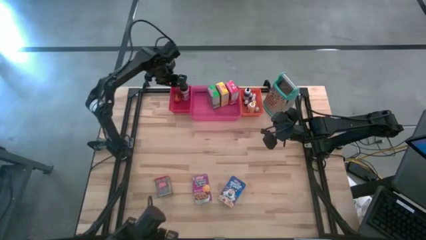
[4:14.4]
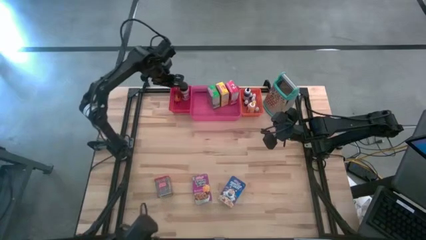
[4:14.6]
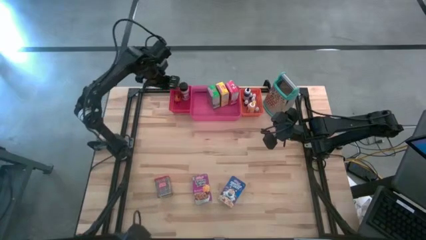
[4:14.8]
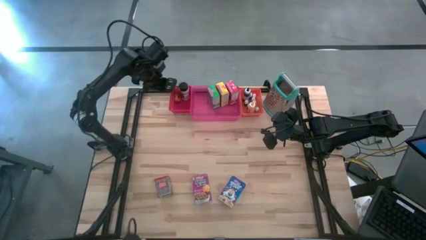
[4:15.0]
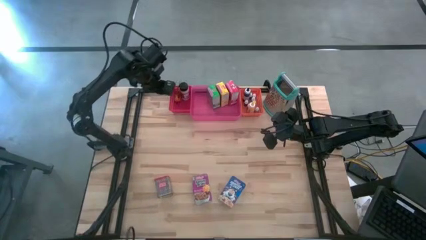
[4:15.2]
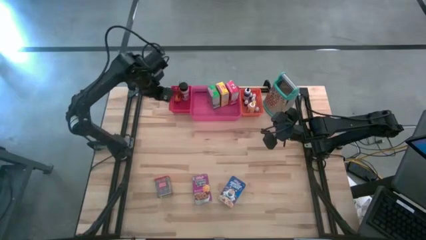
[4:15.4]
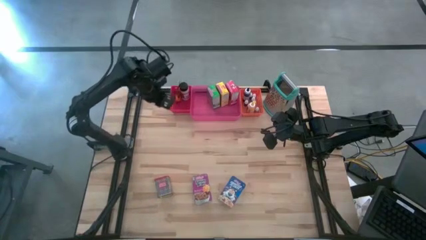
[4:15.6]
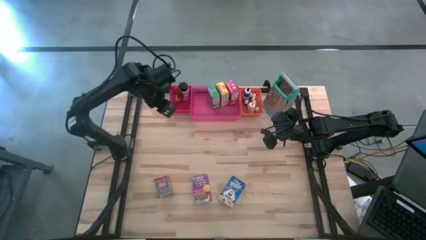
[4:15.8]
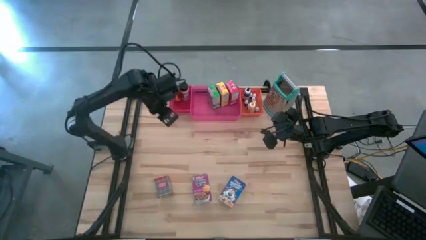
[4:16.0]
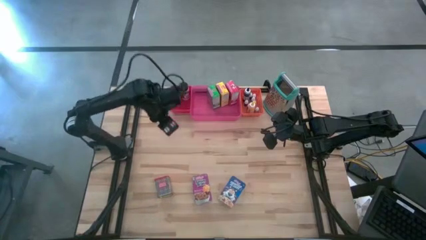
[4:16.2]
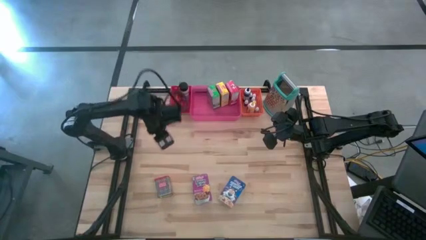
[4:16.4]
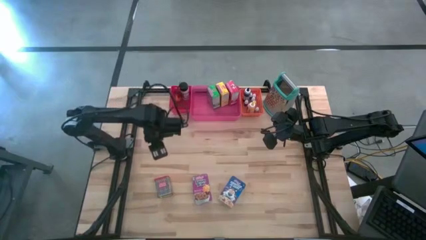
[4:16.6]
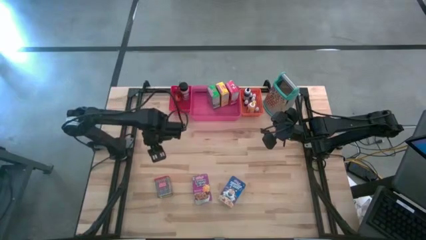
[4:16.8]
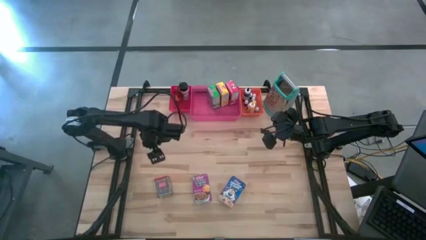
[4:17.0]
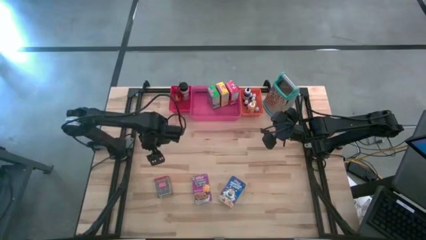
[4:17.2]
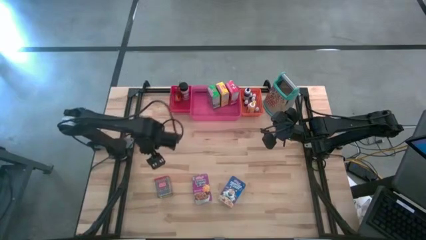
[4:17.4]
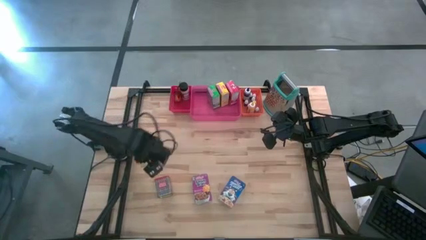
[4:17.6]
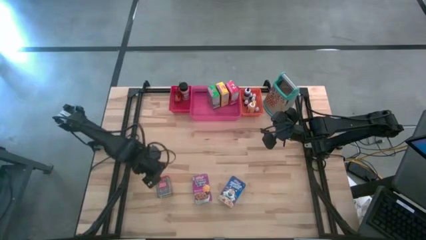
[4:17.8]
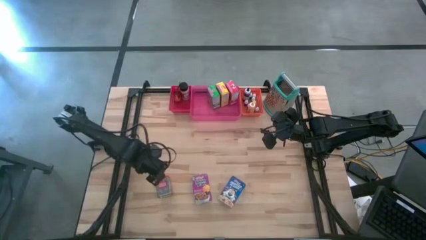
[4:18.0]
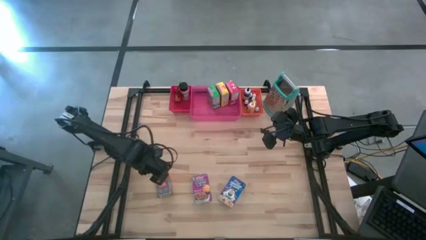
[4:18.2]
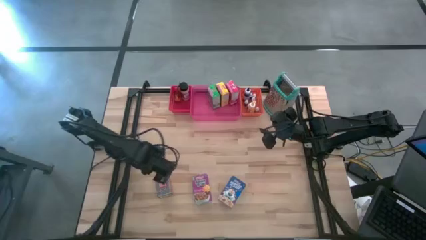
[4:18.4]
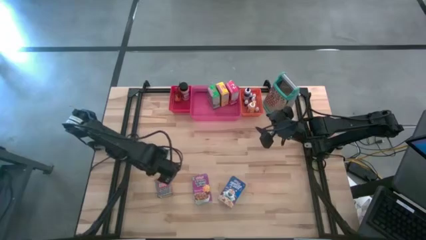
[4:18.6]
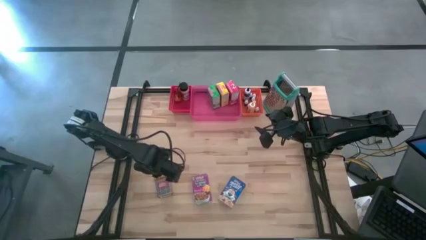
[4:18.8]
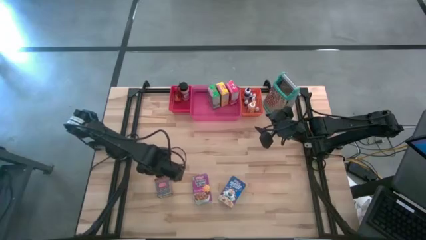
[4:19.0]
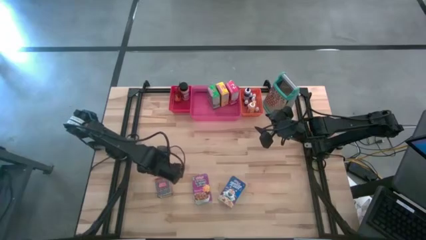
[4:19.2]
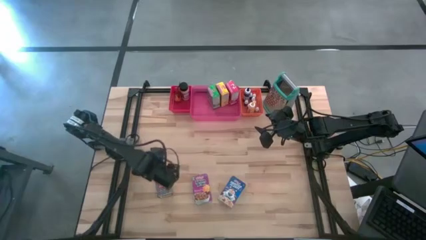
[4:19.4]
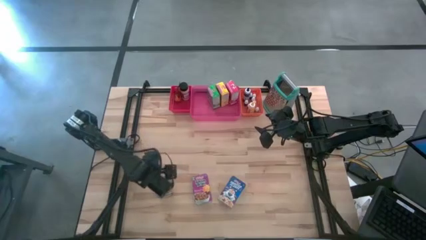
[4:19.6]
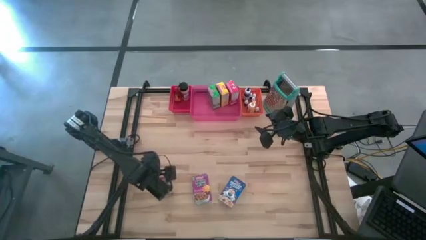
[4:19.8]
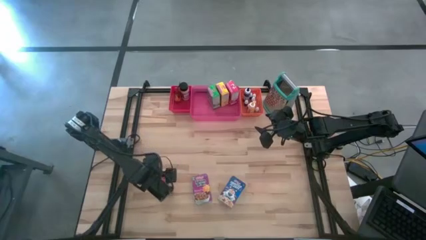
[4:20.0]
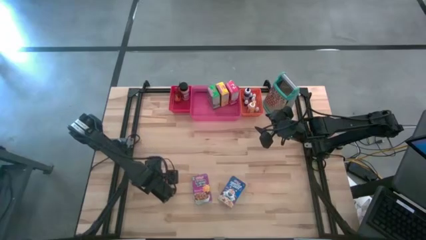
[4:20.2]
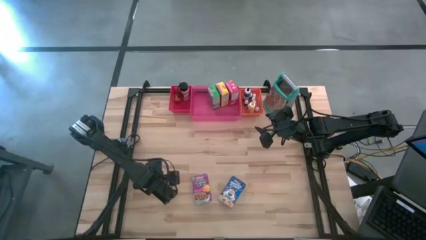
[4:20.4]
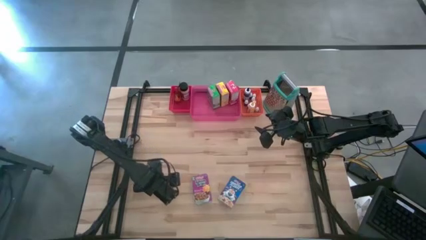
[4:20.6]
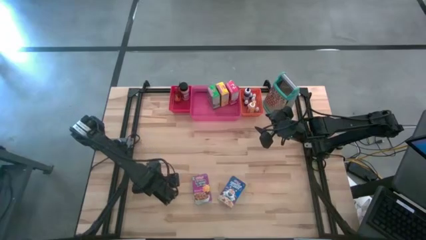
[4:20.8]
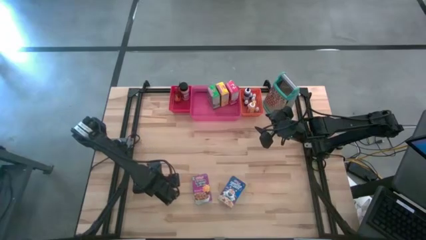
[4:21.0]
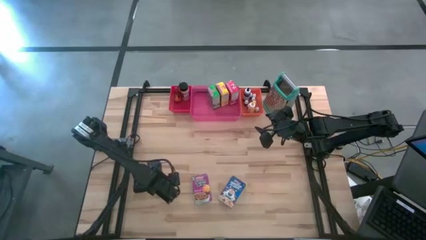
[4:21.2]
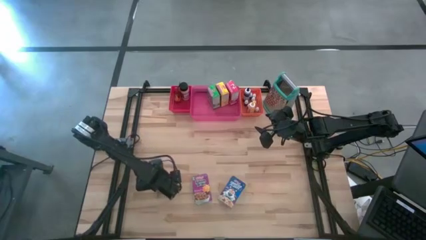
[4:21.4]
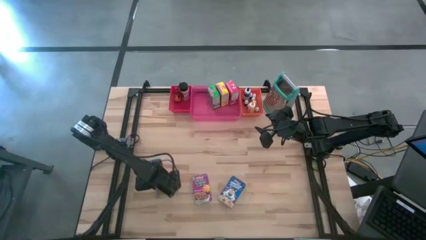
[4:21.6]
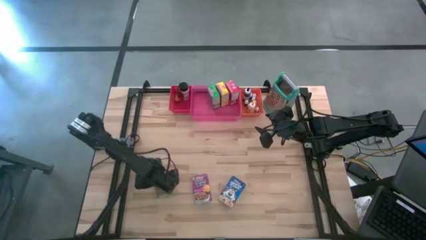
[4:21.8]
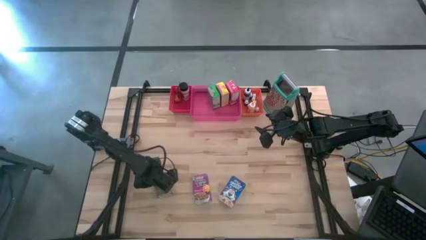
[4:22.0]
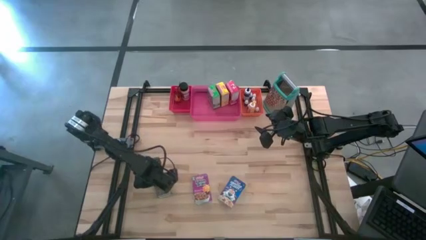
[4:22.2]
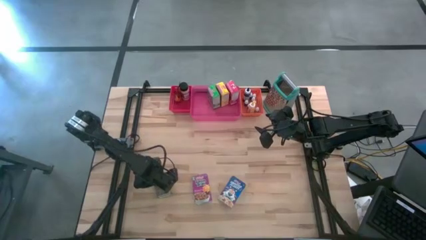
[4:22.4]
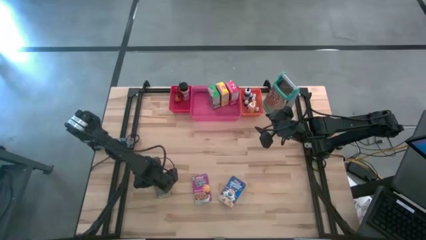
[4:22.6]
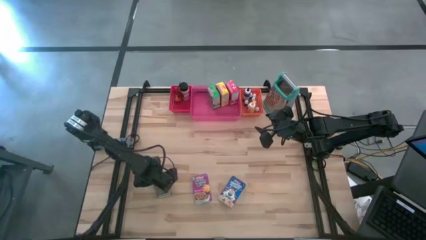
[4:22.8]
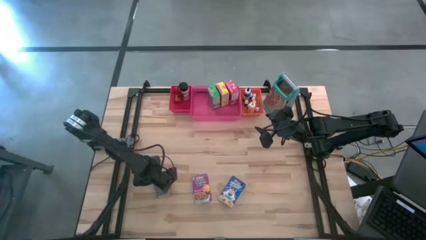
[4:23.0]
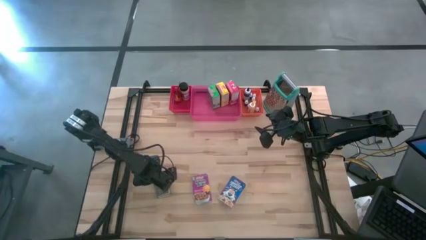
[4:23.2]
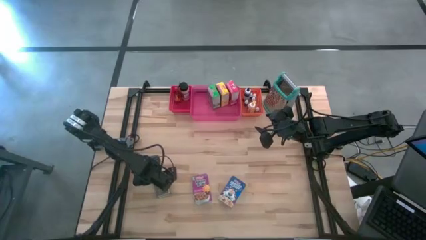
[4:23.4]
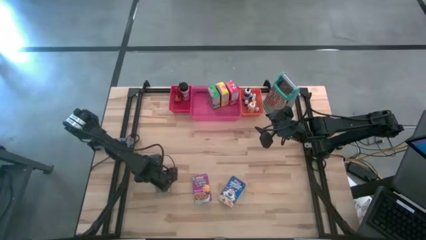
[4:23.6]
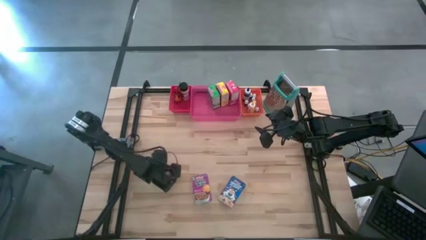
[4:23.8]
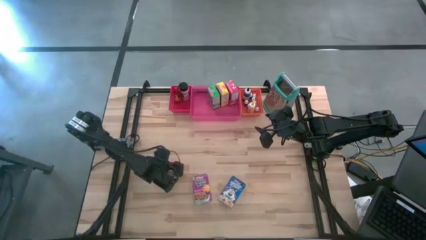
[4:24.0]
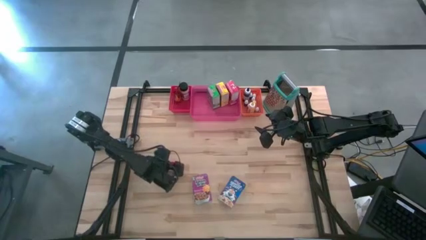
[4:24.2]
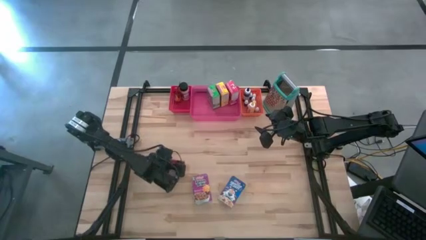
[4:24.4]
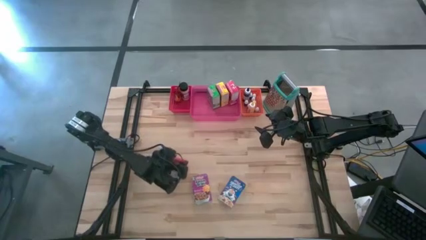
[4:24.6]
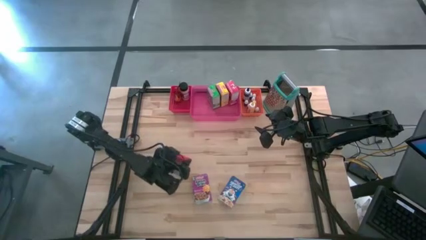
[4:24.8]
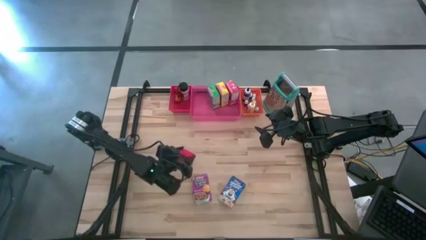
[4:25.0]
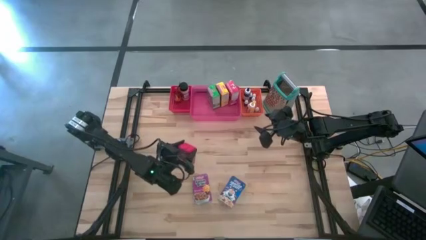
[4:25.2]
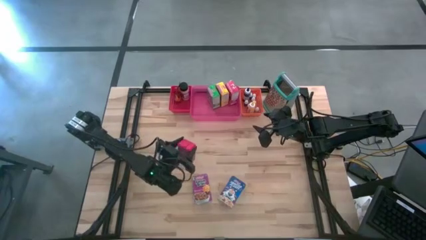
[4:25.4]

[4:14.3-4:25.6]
Task: Pick & Place Kitchen Items
Put the red seasoning can into the red bin

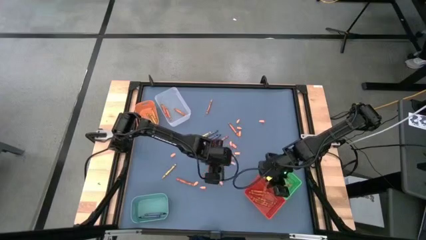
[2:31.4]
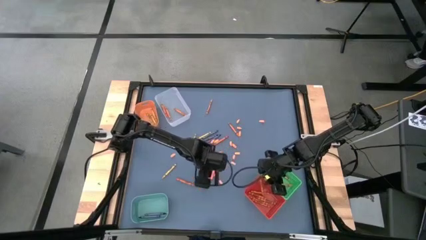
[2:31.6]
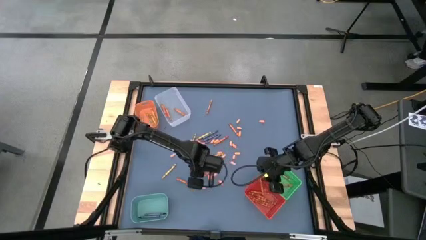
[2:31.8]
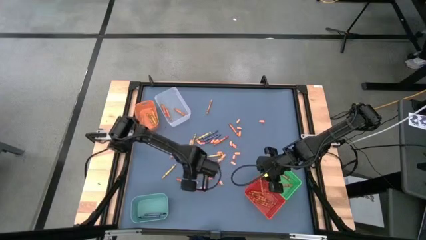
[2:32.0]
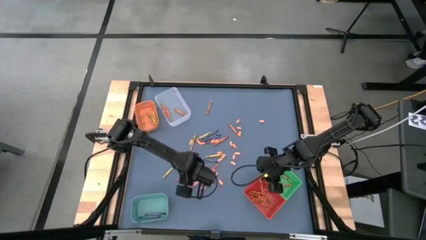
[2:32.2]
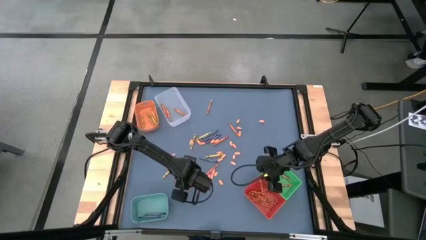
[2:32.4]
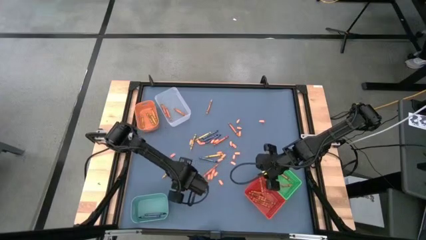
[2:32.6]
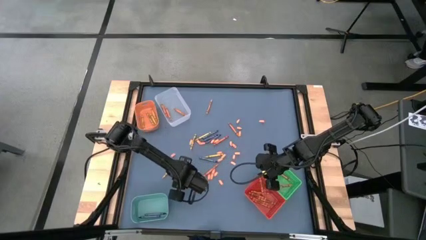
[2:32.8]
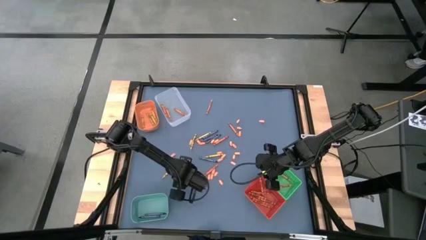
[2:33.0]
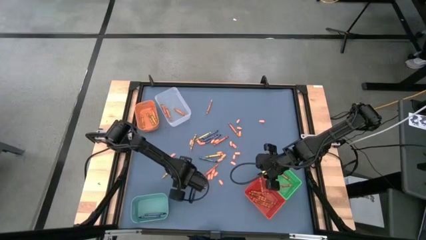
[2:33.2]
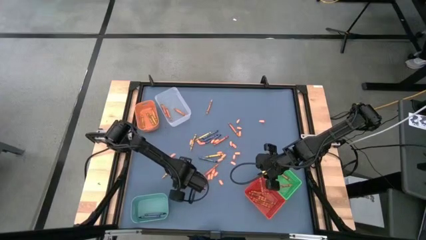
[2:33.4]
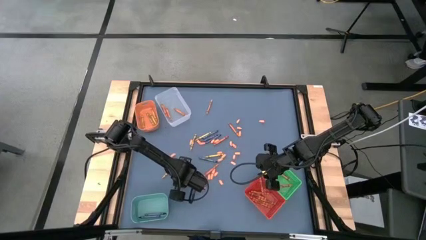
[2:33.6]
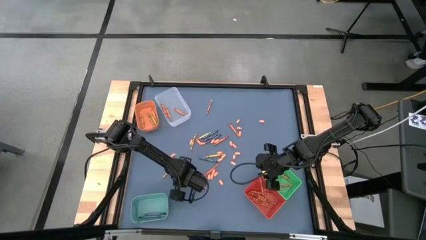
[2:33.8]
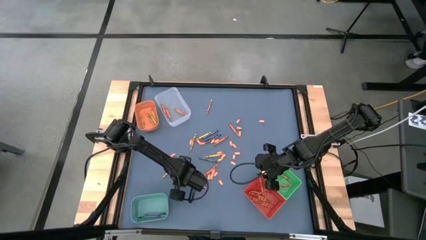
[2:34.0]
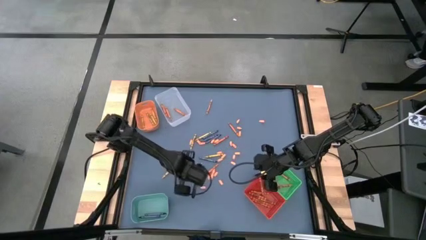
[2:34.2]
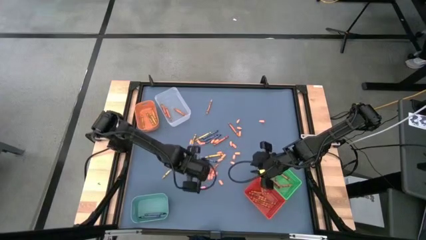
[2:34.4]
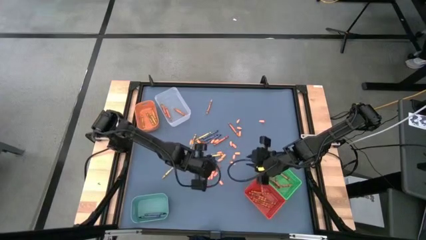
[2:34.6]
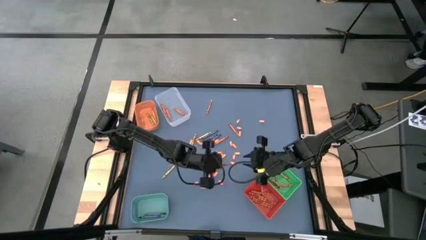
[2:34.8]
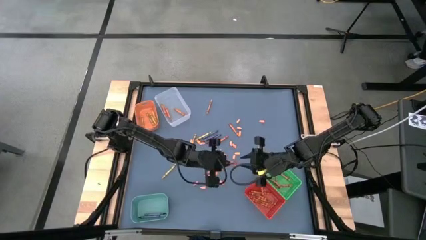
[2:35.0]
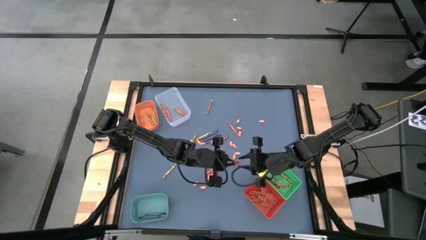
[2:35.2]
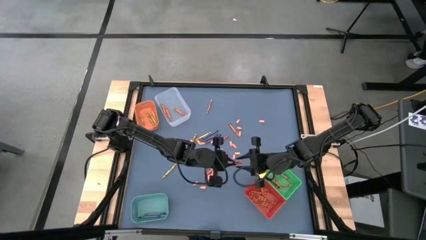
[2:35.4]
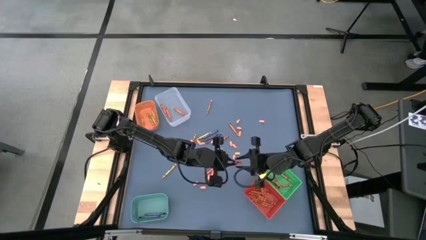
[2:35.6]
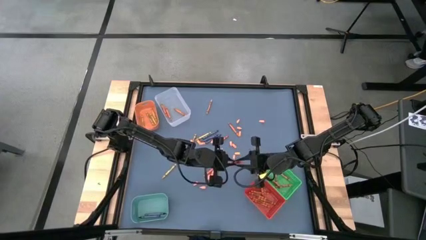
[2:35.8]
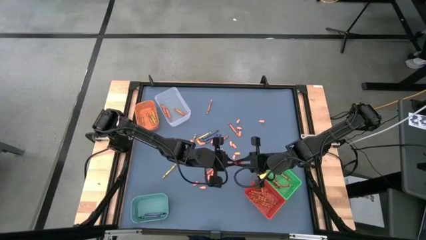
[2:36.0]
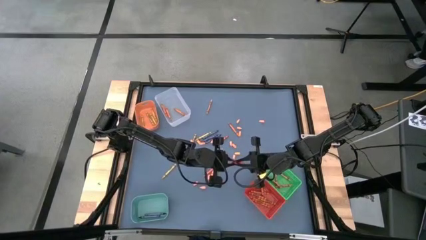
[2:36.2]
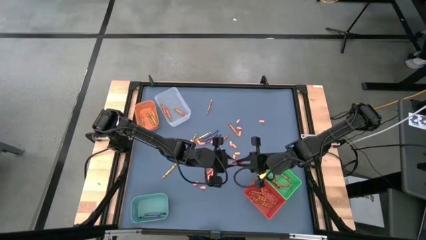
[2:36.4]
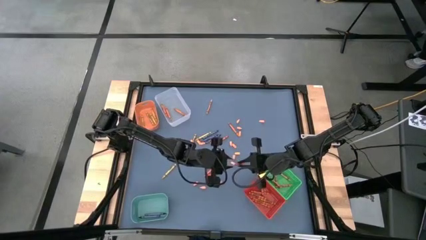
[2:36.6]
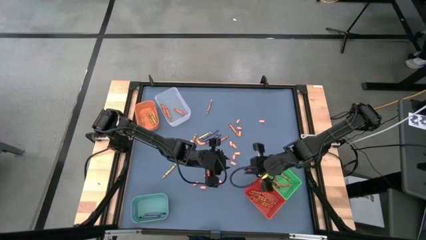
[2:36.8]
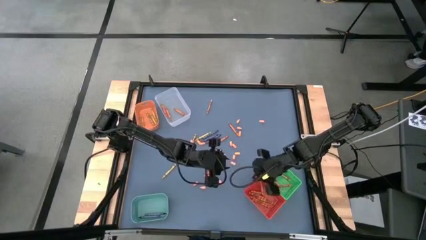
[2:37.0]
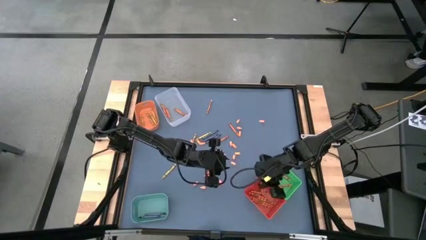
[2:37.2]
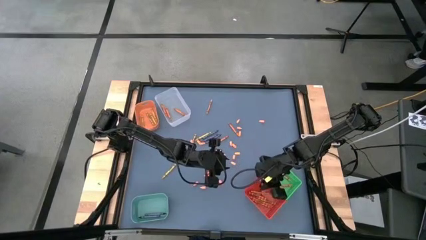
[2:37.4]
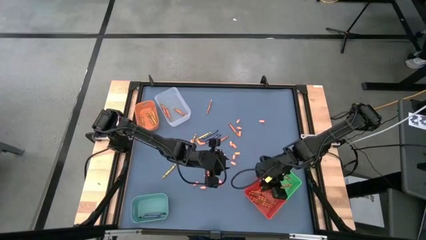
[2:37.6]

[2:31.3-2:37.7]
Task: Sort crayons
Put the red crayon into the red bin
